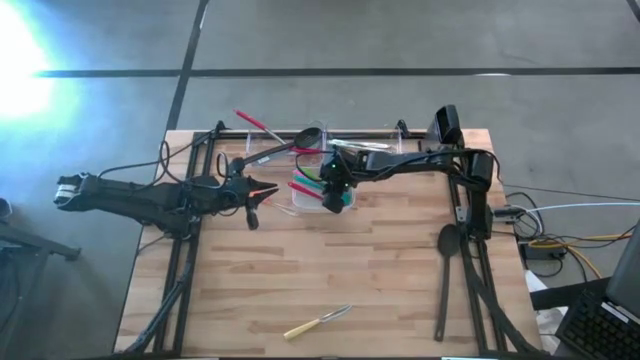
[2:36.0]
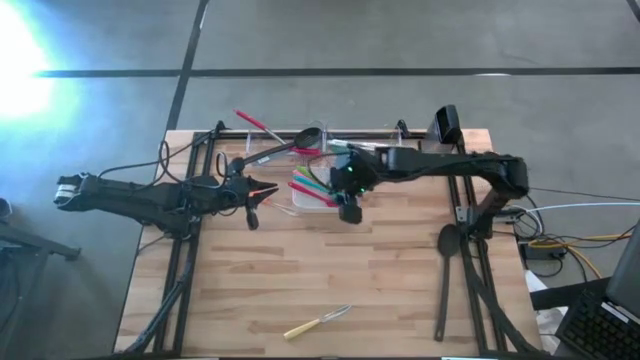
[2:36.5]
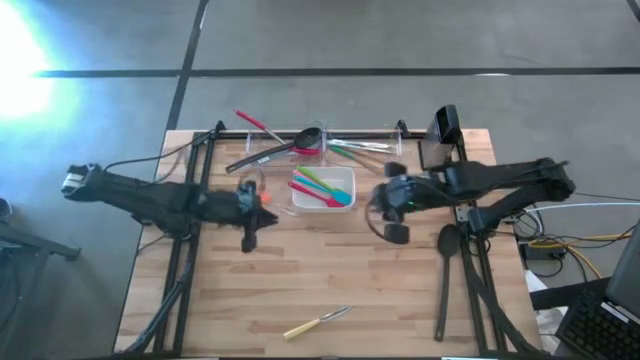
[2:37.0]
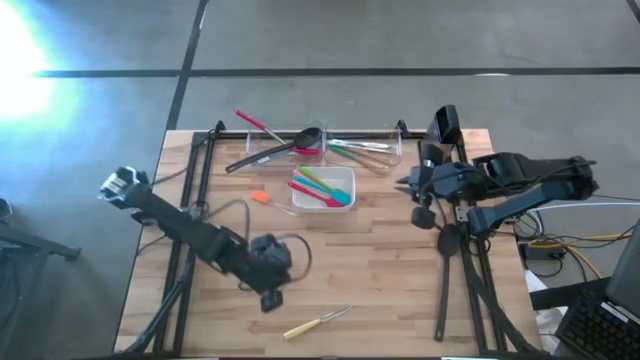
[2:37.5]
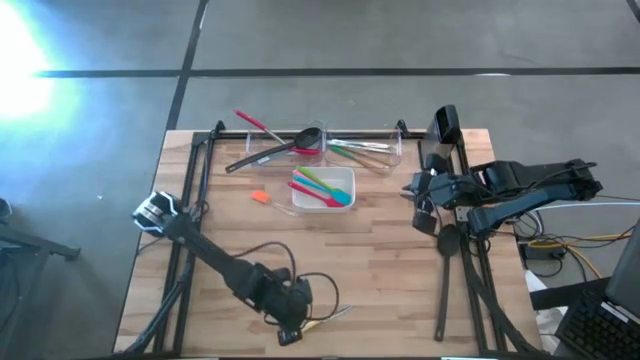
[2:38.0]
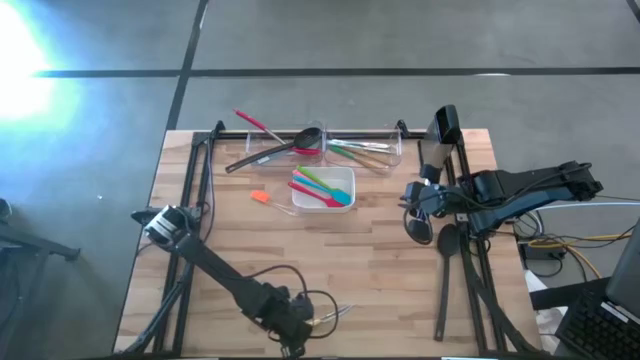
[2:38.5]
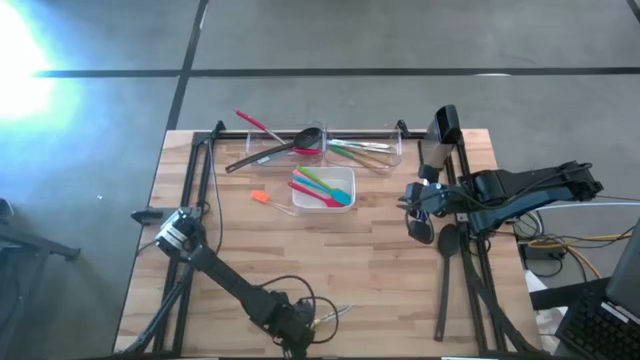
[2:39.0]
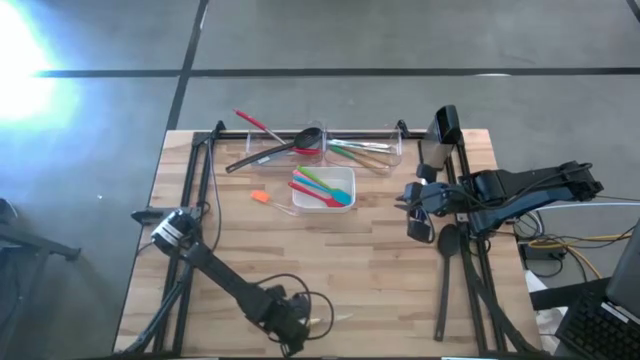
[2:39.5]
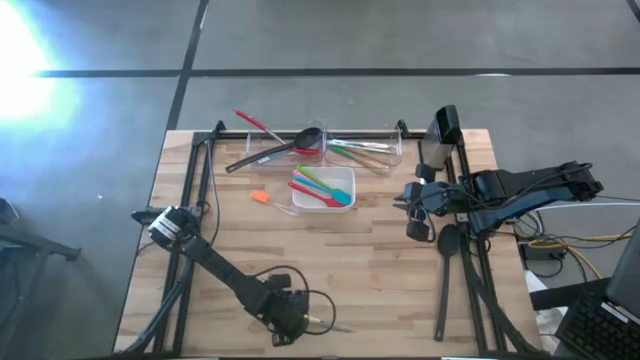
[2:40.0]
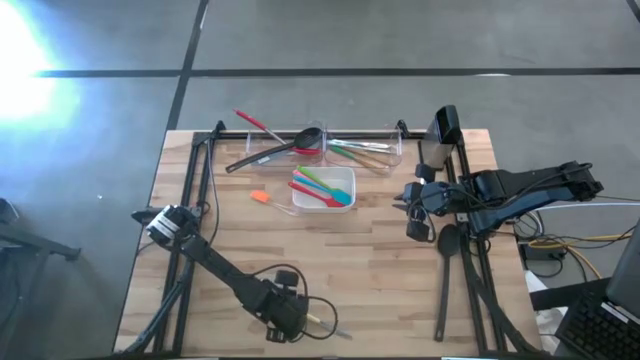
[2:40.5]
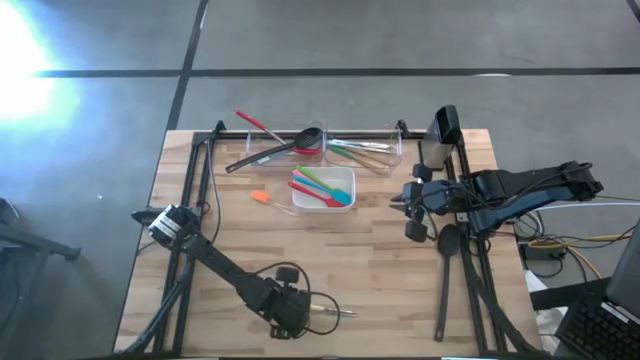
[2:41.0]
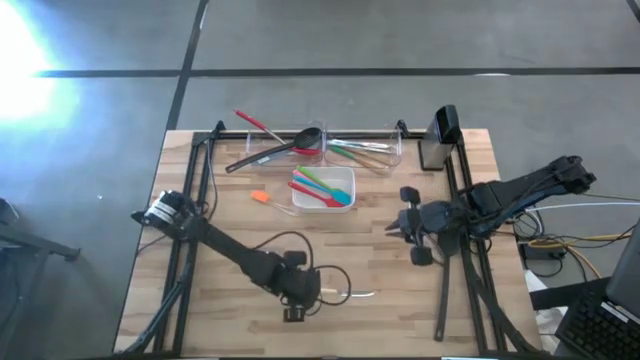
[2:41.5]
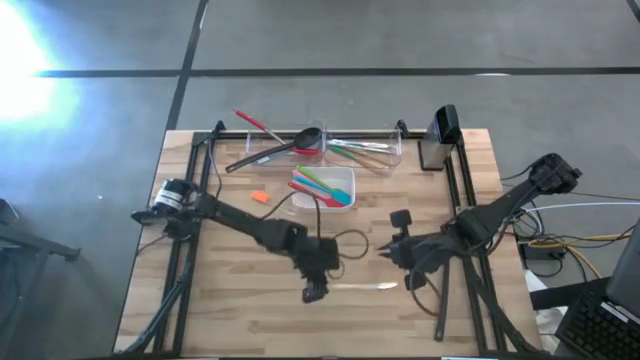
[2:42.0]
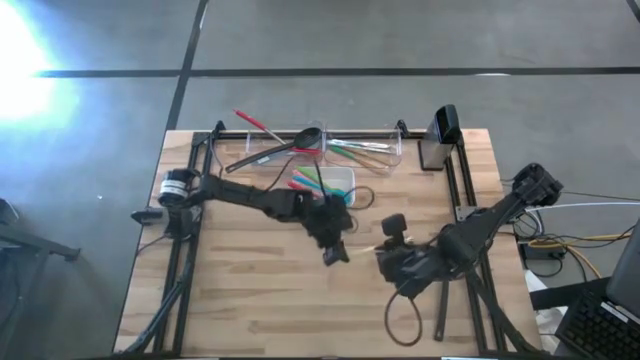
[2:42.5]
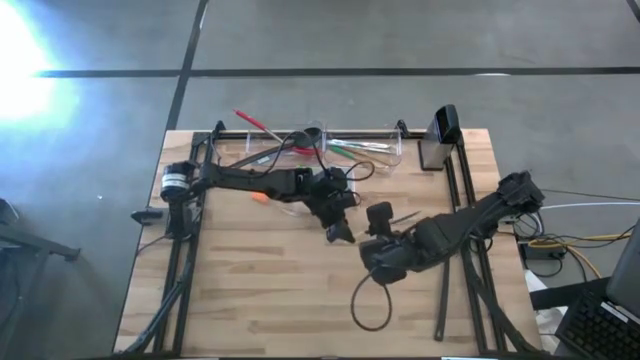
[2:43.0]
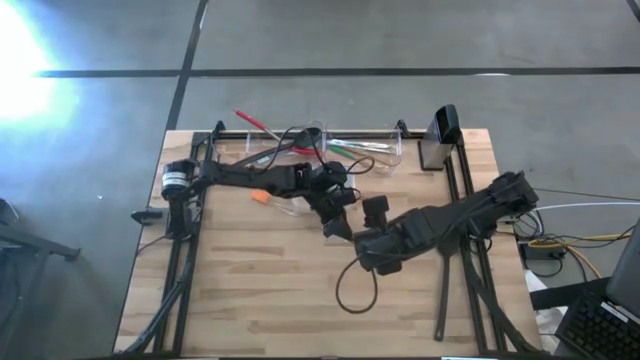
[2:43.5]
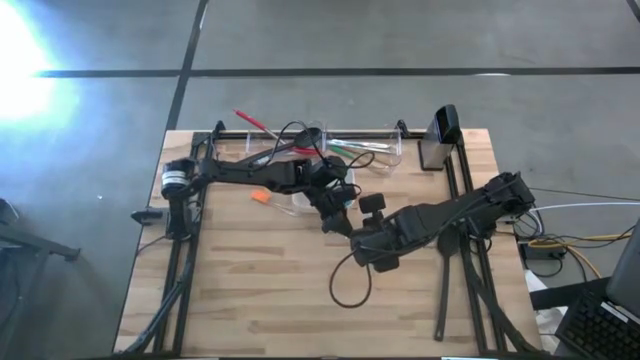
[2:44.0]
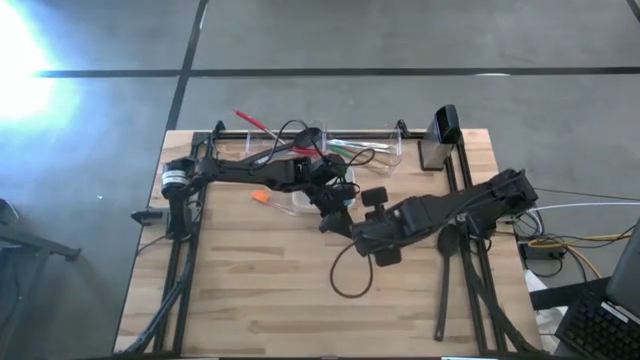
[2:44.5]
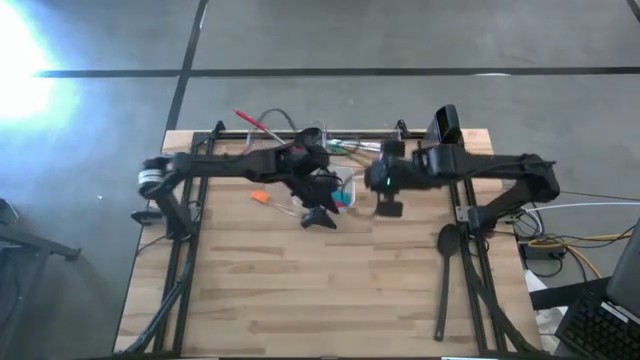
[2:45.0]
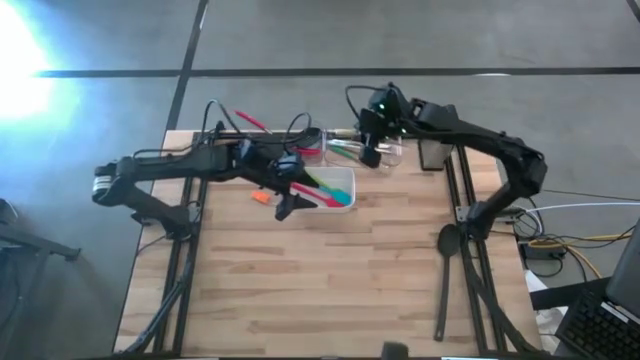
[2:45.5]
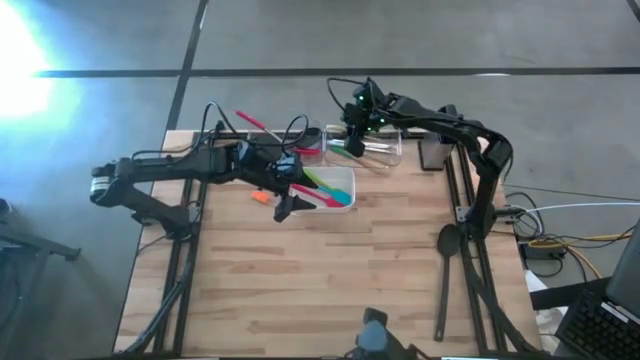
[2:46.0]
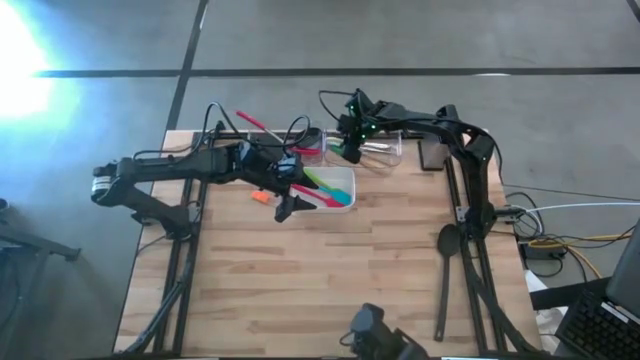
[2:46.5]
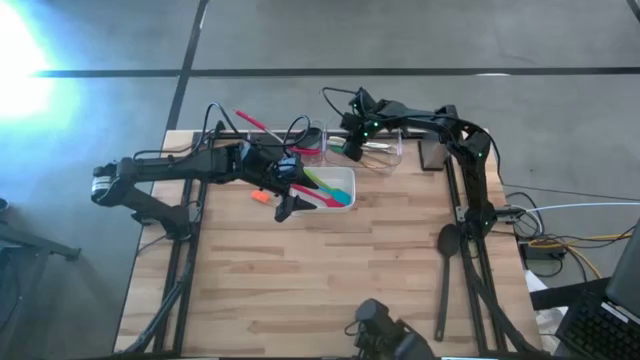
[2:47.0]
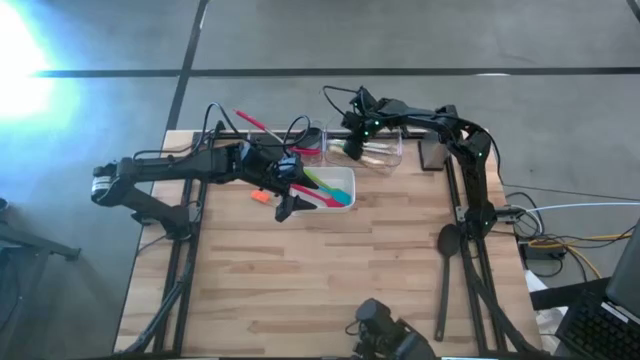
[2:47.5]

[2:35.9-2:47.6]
Task: Pick & Place Kitchen Items
Put the yellow table knife into the right transparent bin

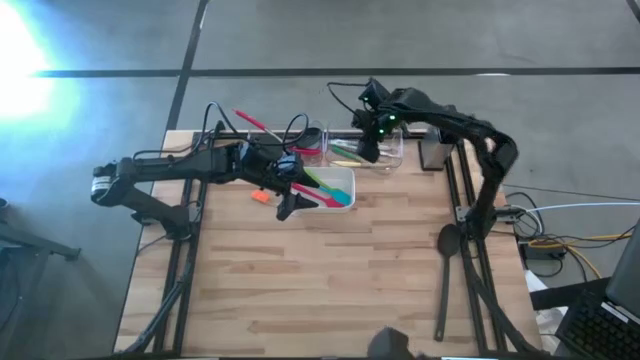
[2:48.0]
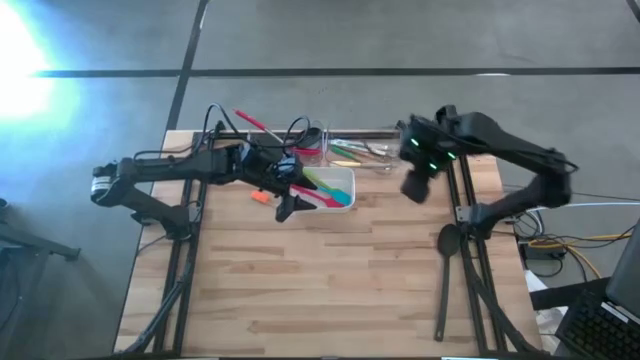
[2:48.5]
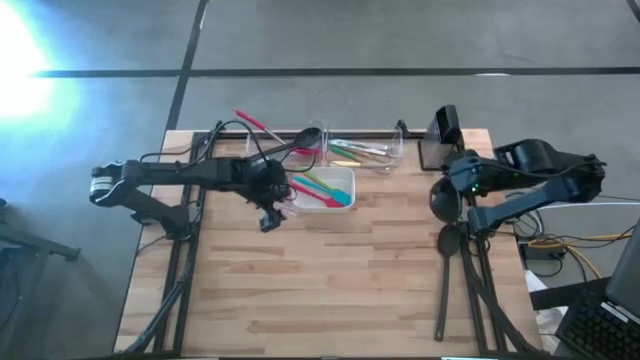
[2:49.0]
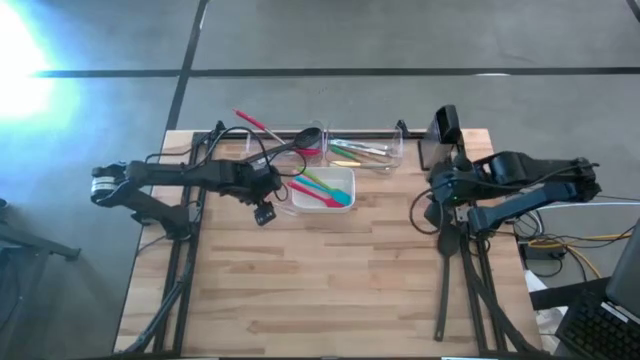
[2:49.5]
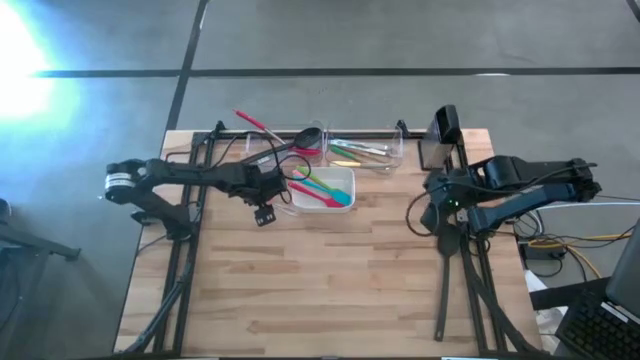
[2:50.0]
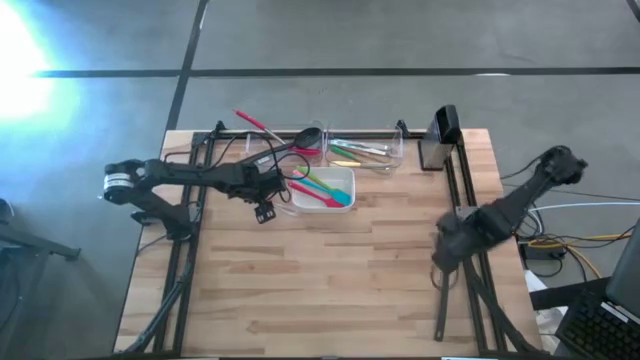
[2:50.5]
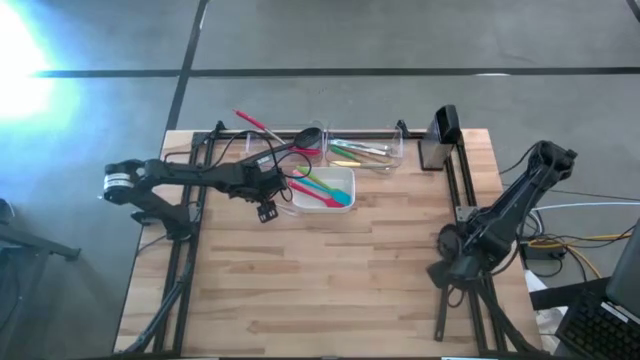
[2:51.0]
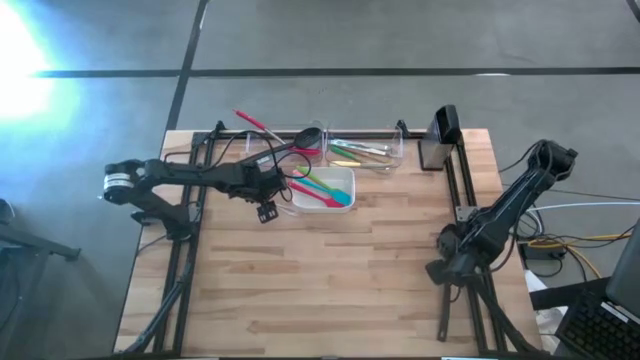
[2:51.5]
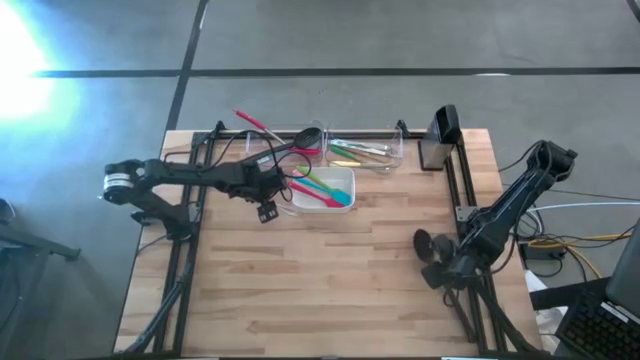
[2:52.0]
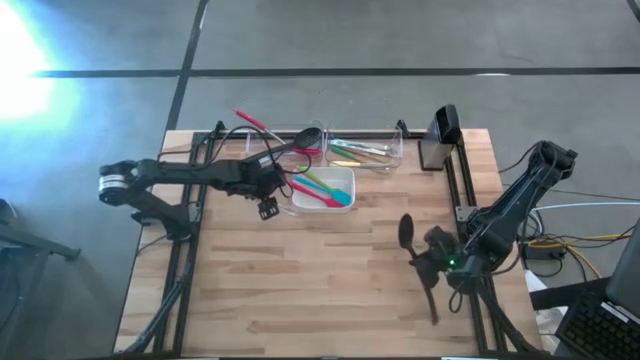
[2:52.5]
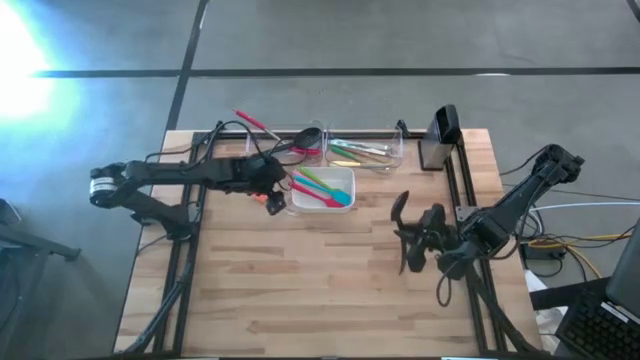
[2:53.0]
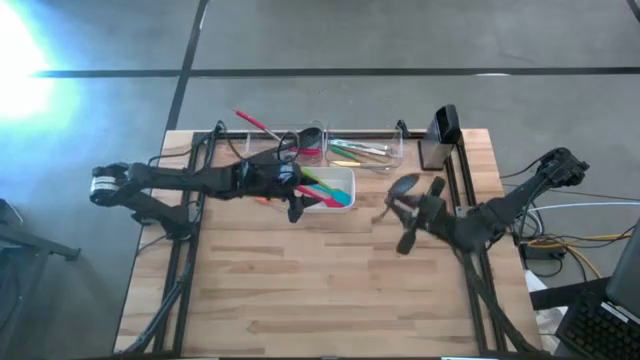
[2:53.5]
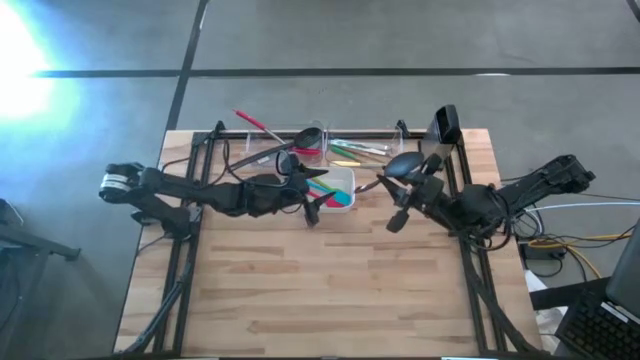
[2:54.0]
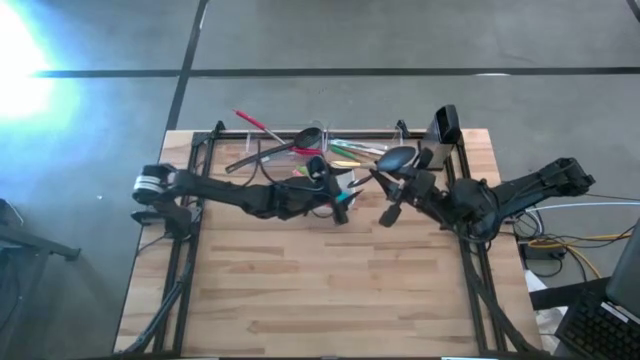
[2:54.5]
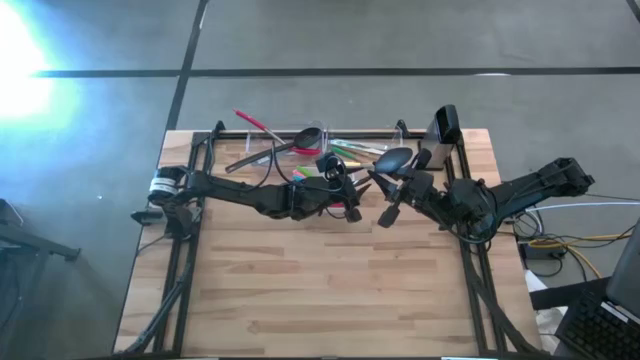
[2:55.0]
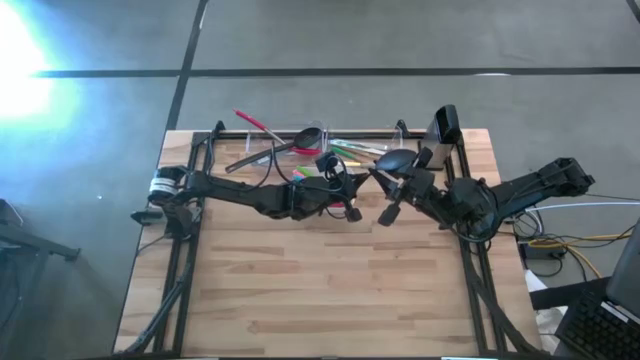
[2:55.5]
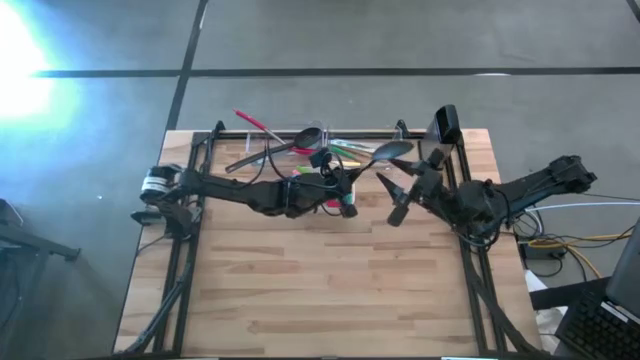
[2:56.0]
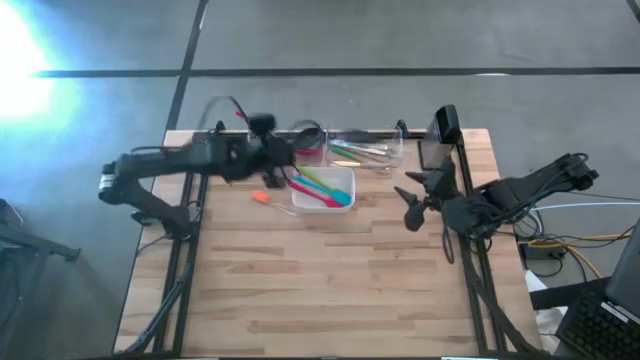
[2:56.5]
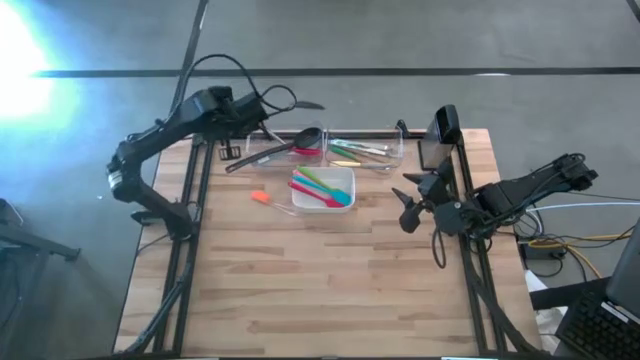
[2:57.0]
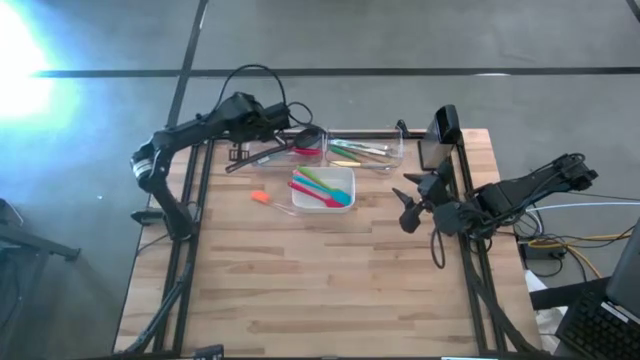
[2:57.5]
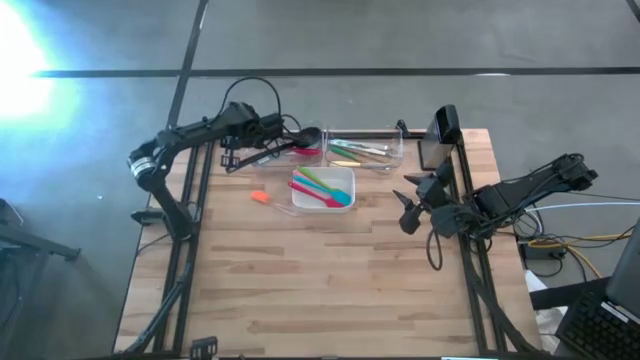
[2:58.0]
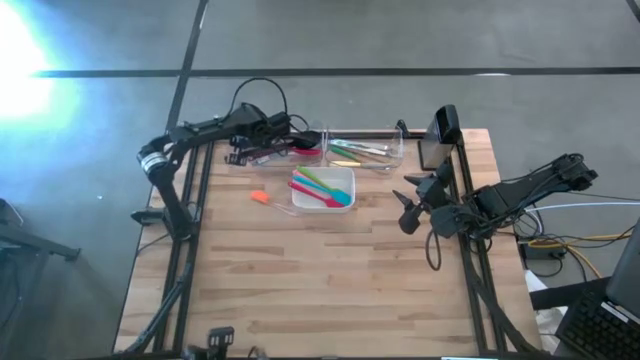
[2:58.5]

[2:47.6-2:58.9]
Put the black serving spoon into the left transparent bin
